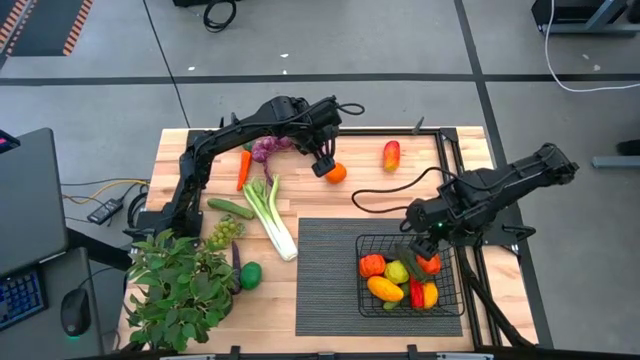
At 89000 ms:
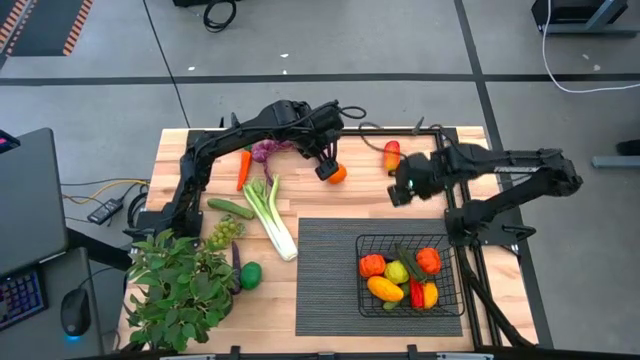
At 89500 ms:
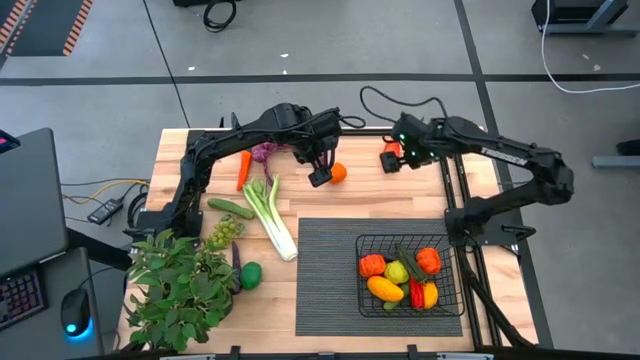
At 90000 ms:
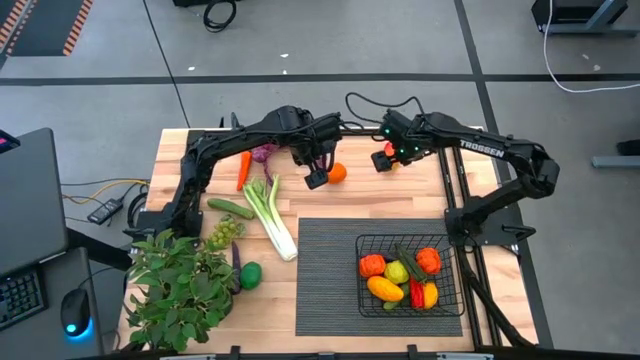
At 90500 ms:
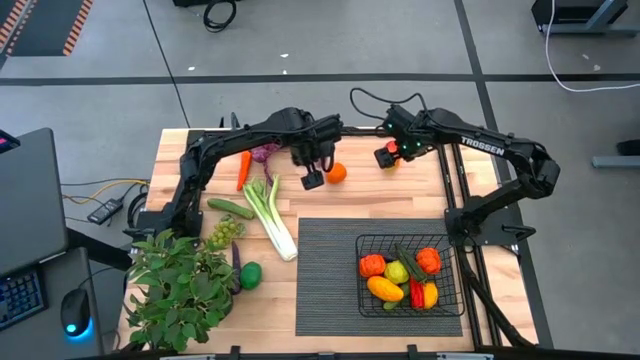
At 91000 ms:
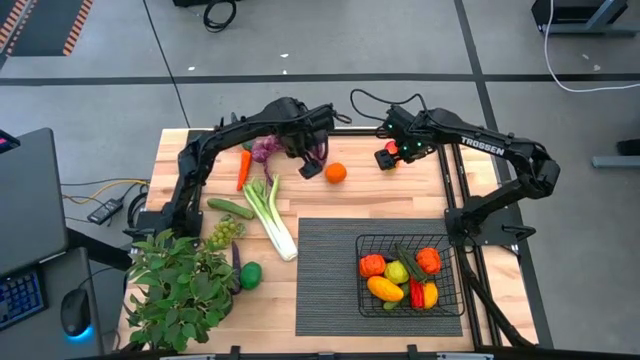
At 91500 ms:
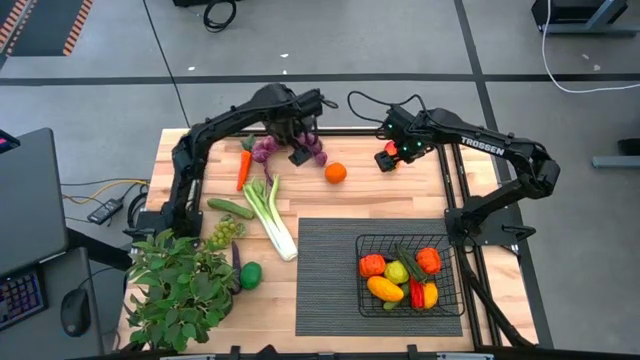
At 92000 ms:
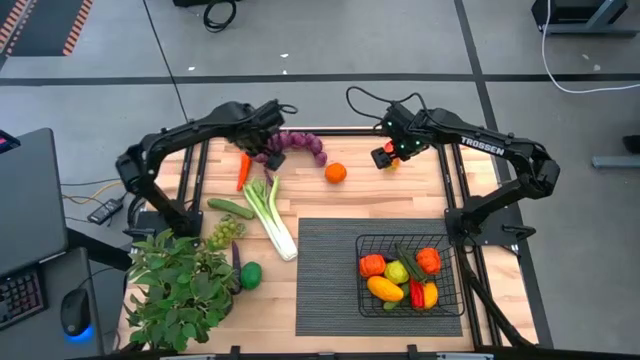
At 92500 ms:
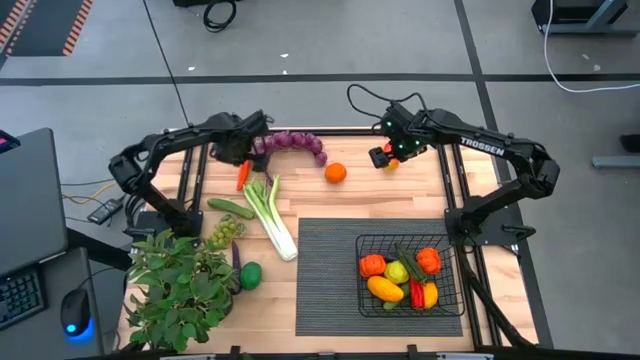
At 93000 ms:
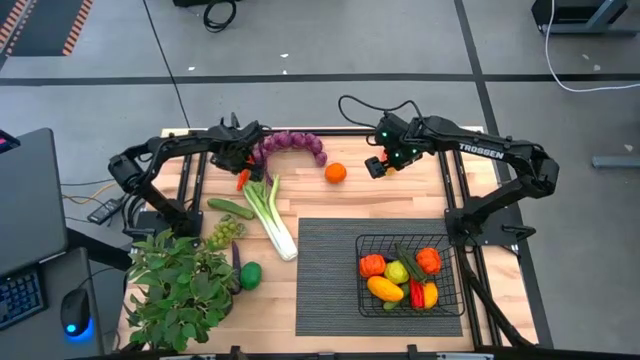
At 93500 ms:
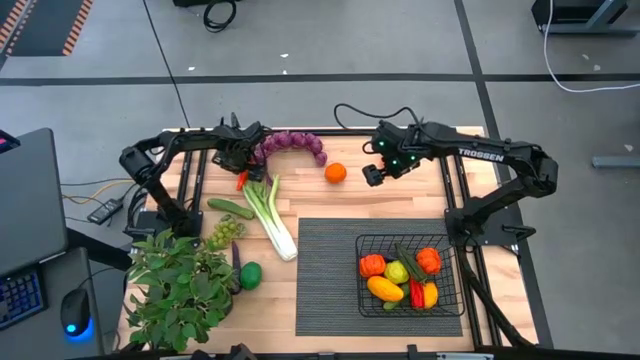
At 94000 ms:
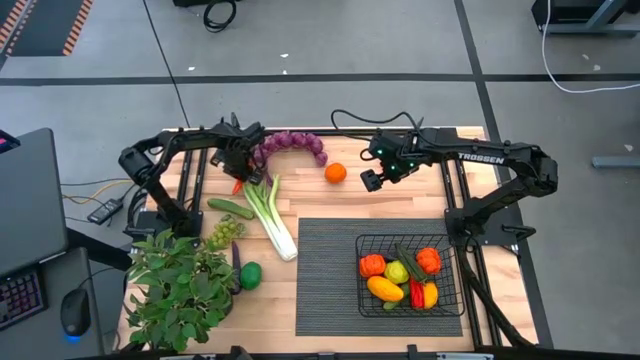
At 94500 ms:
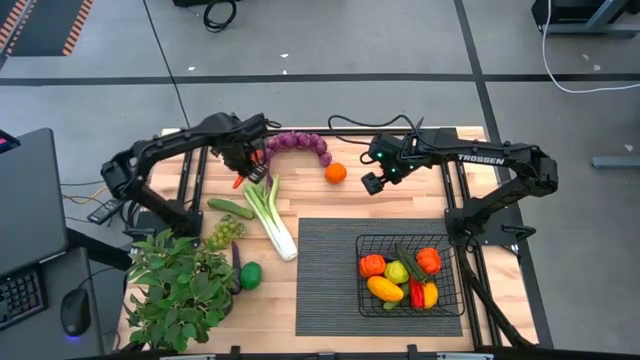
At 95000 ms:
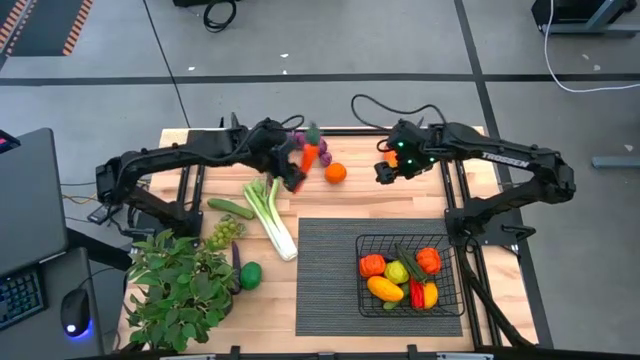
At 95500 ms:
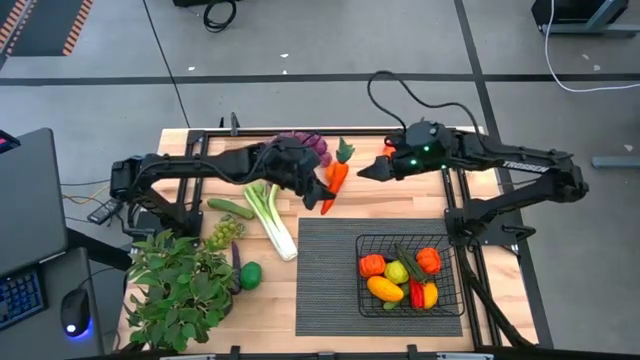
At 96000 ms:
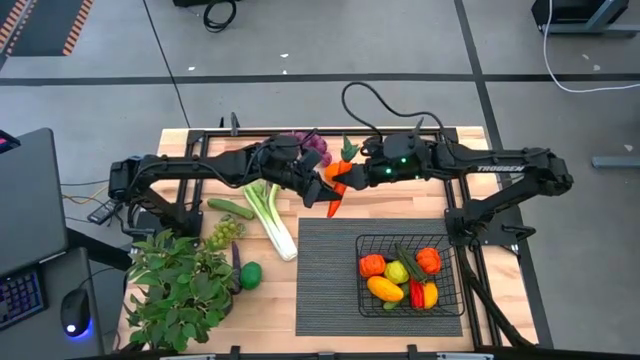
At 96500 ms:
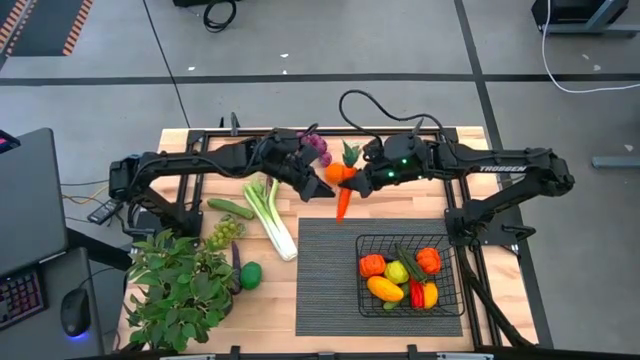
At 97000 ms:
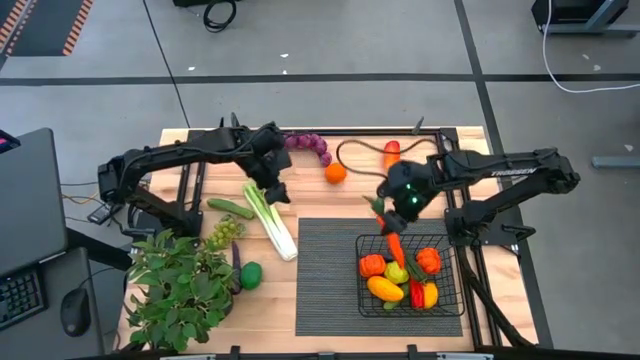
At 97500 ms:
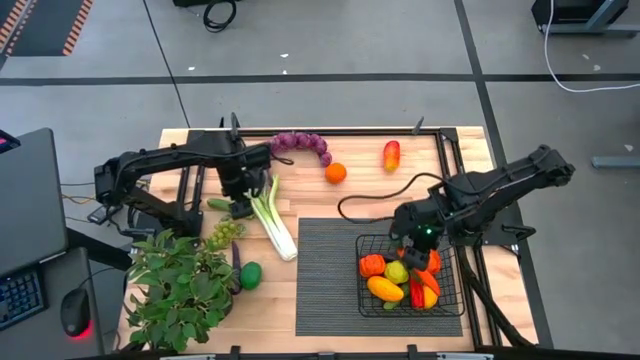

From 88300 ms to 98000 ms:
Task: Build produce basket
Put the carrot into the wire basket

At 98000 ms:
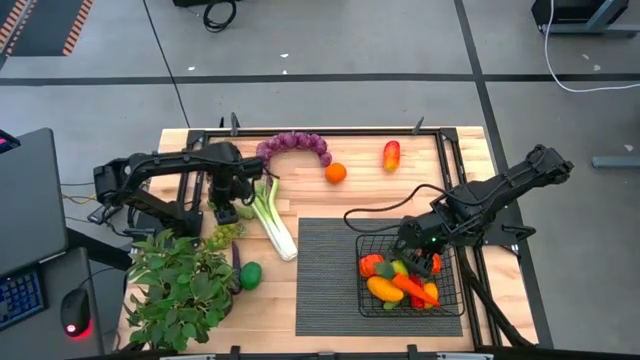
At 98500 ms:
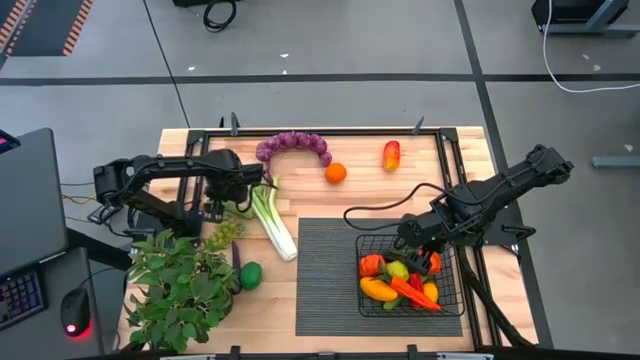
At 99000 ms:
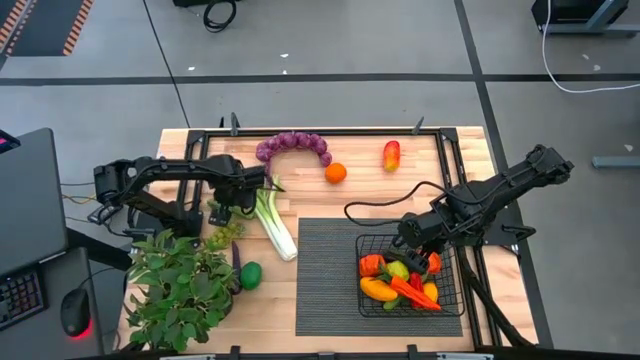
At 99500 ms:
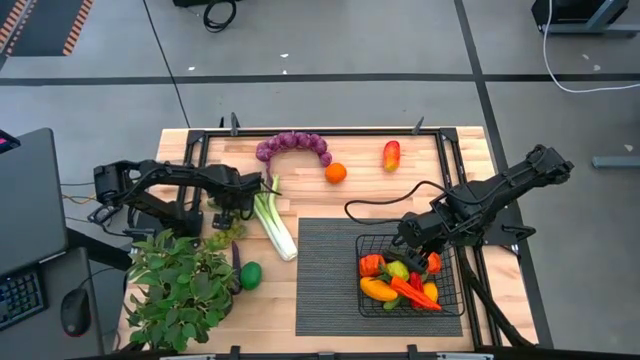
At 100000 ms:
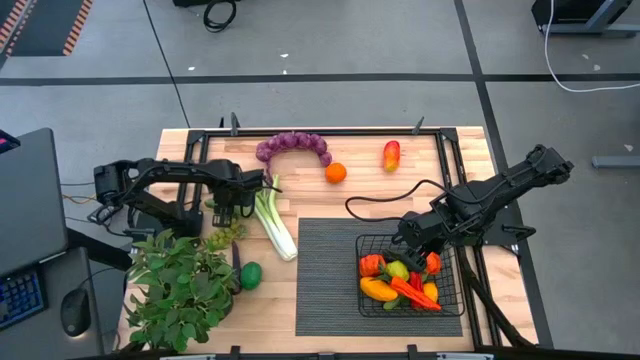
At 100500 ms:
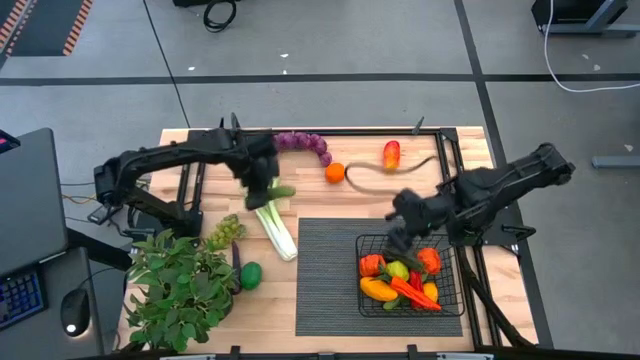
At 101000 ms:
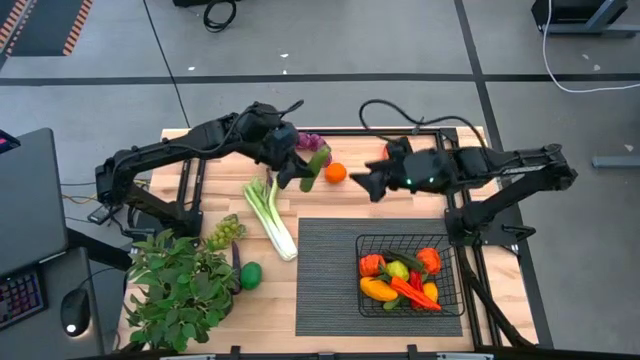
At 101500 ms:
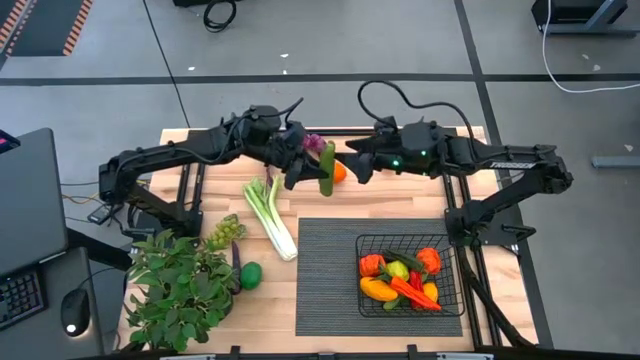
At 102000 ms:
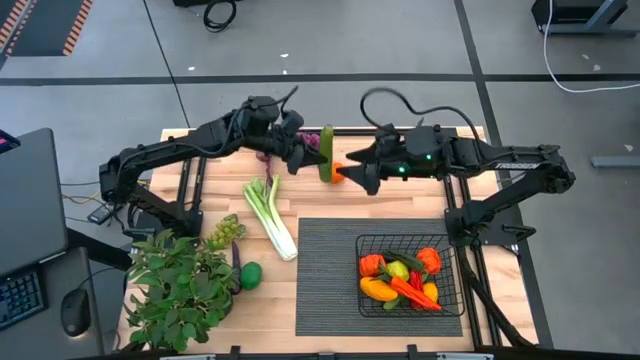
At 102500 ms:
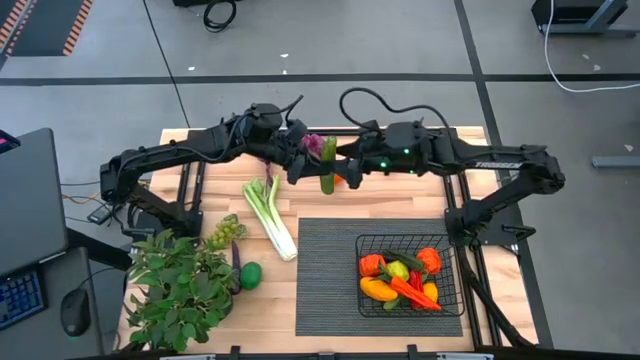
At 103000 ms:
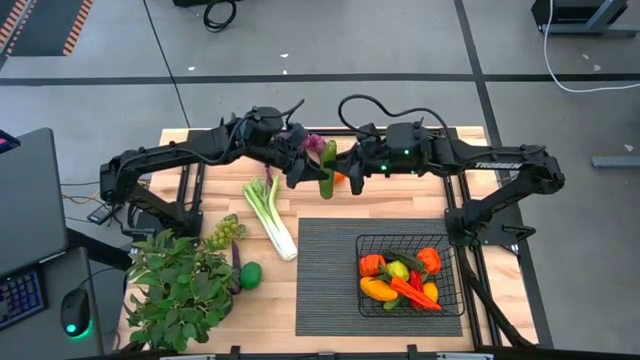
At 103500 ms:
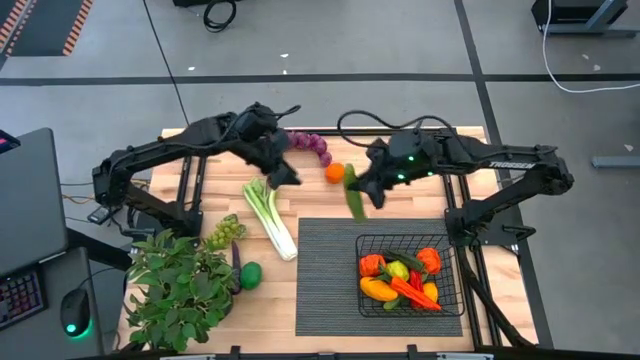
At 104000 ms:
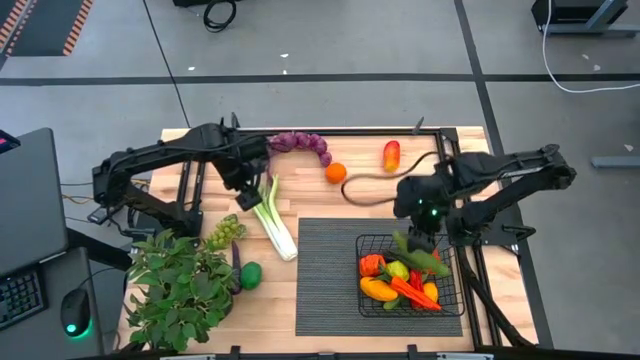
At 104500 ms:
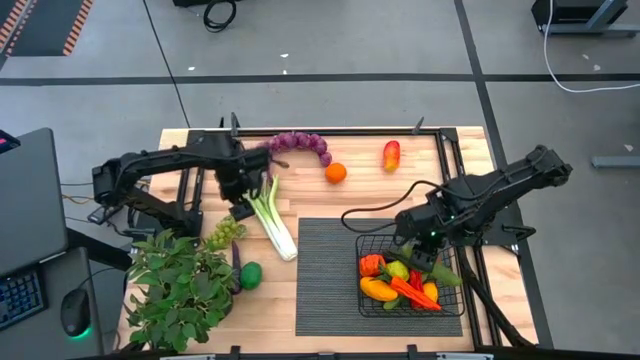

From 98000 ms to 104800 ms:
Put the cucumber into the wire basket

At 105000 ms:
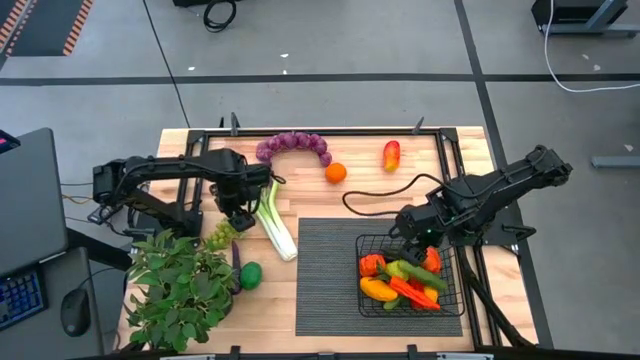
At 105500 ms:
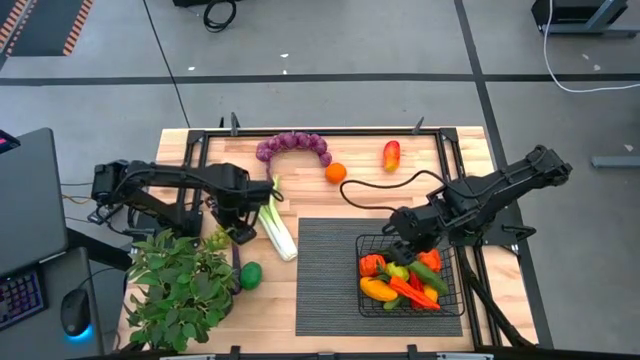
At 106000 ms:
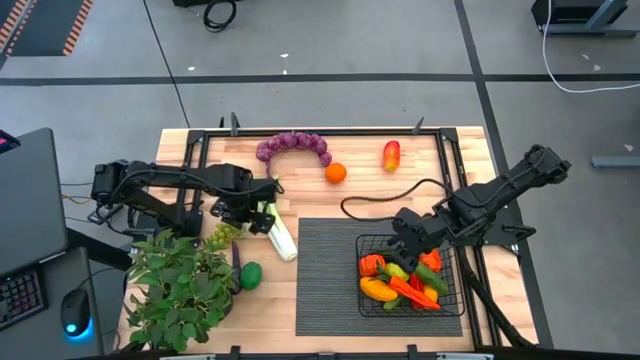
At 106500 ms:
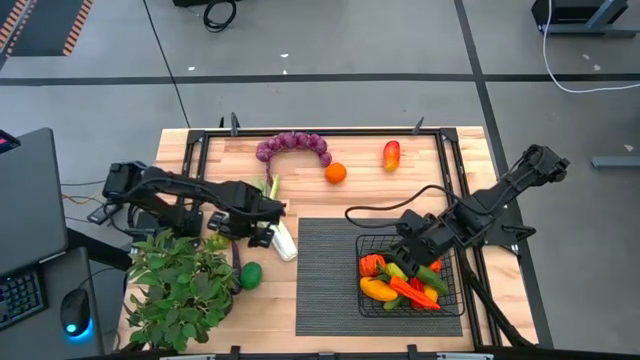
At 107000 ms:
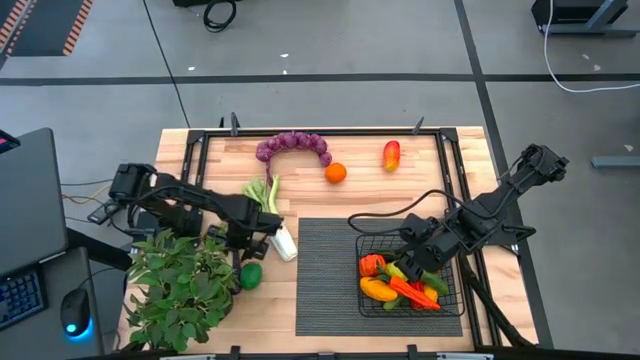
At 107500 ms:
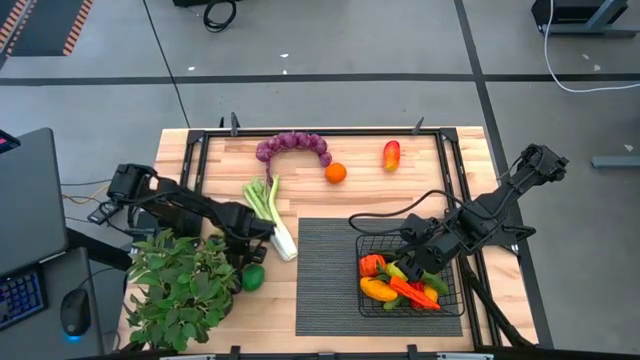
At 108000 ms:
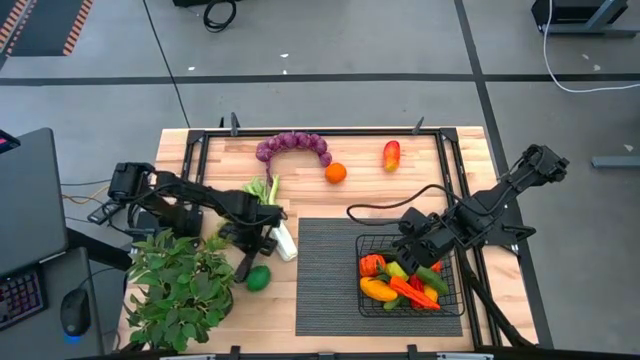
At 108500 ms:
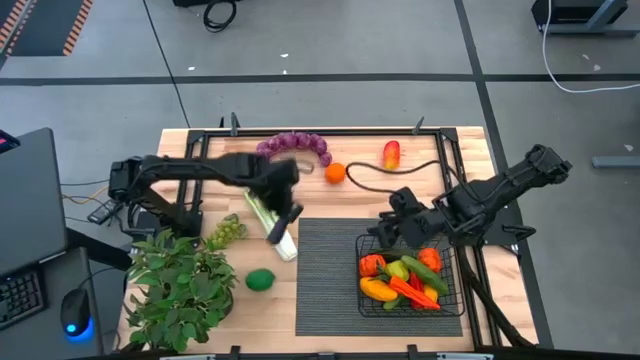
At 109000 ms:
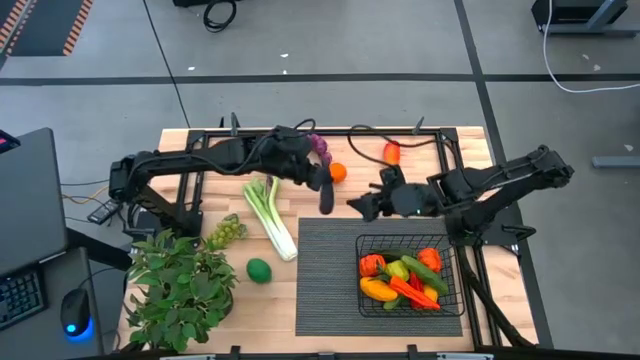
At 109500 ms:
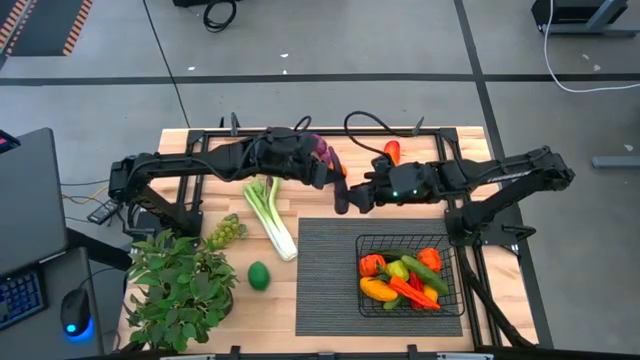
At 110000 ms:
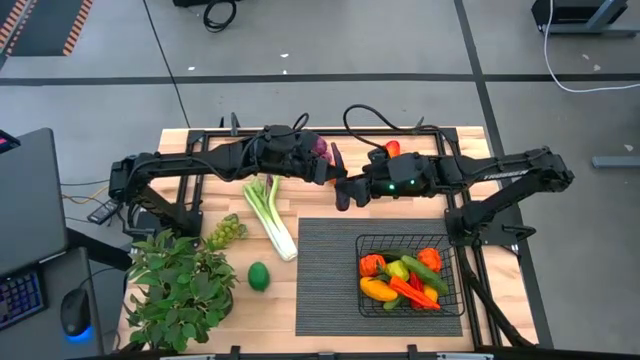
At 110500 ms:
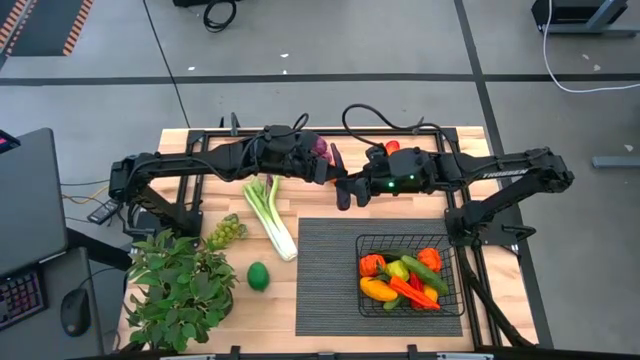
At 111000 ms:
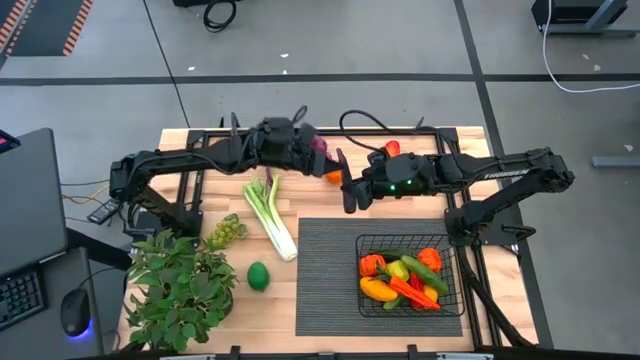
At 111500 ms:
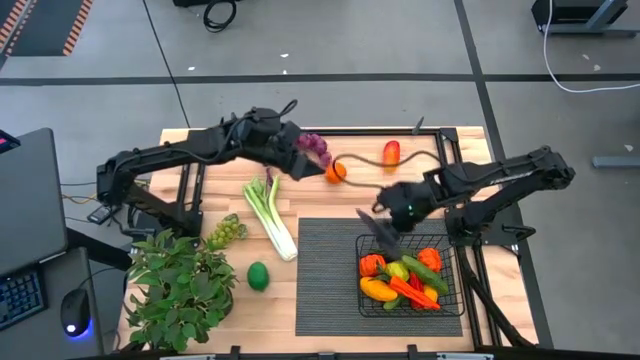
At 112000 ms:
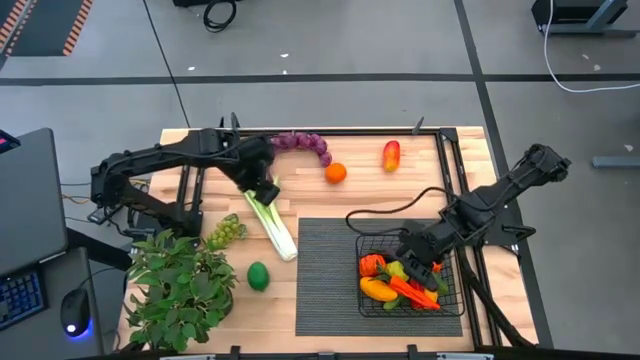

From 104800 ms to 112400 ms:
Put the eggplant into the wire basket
